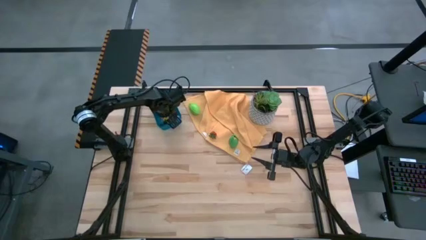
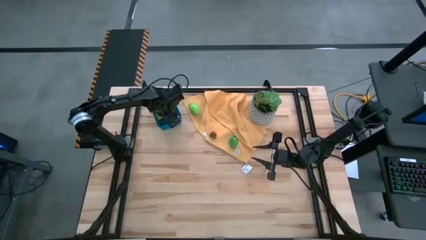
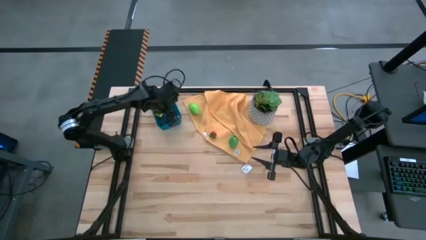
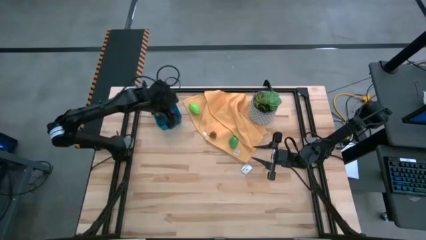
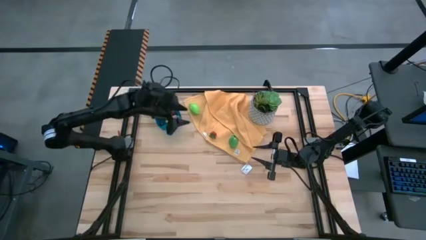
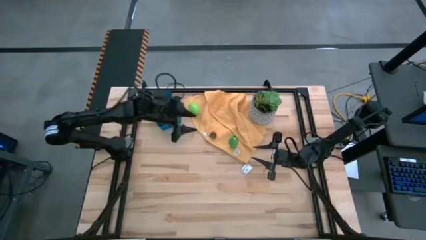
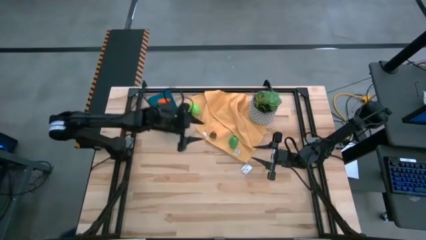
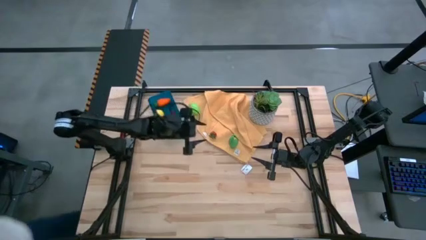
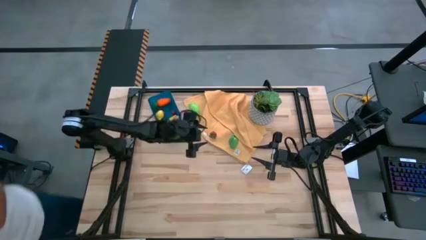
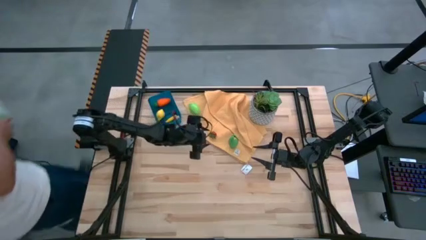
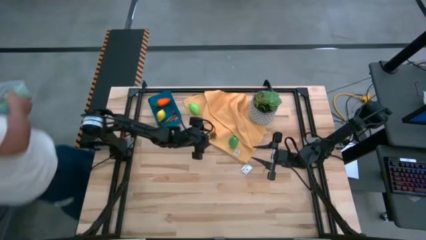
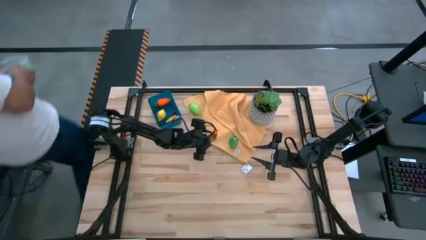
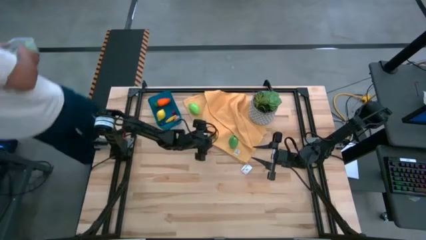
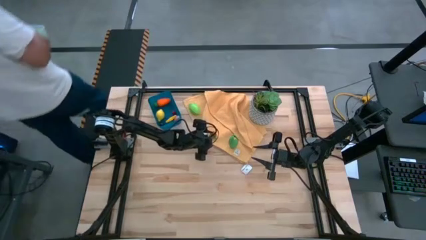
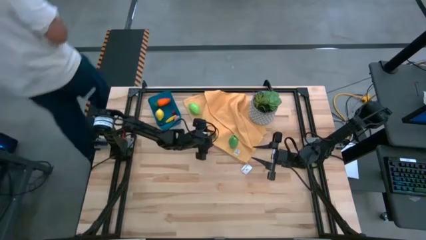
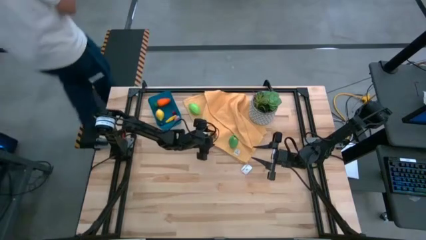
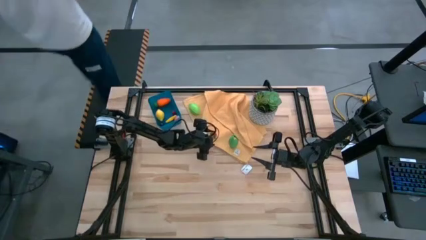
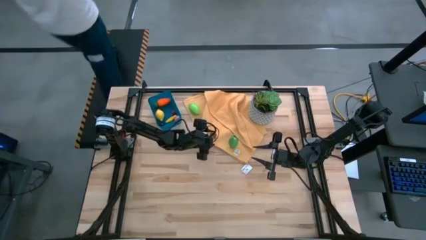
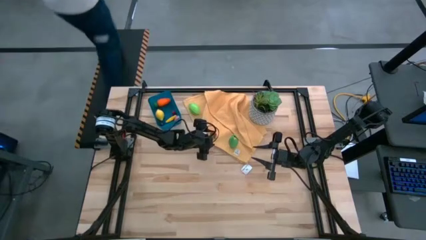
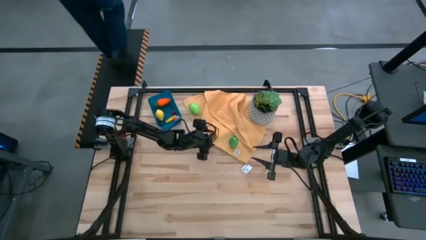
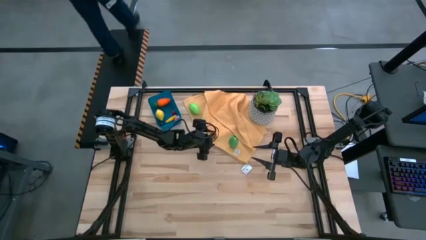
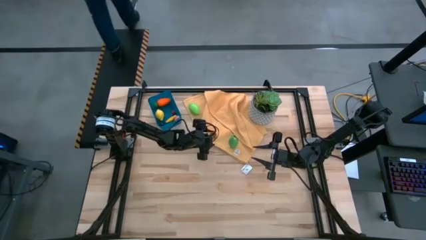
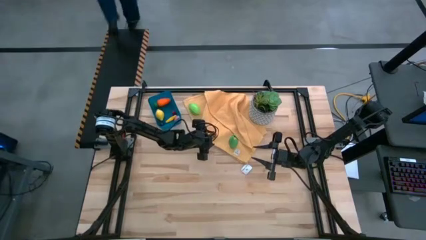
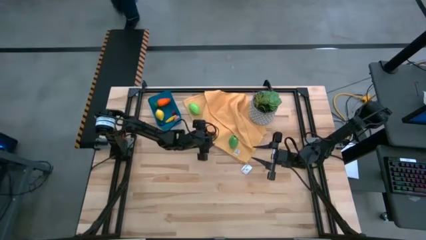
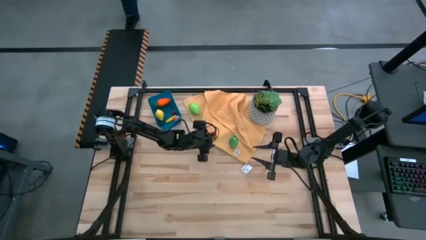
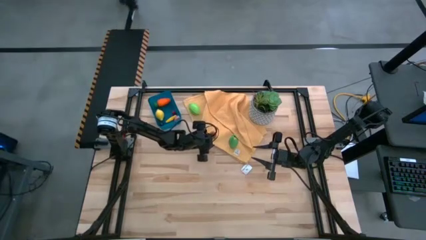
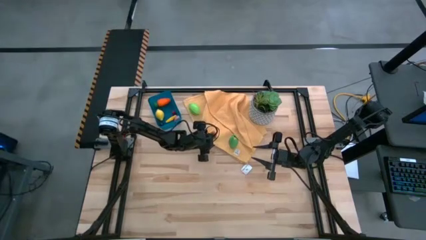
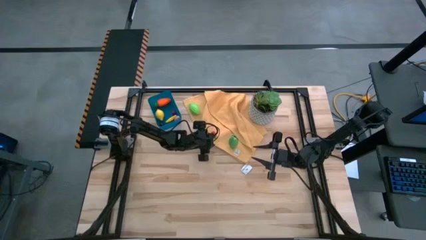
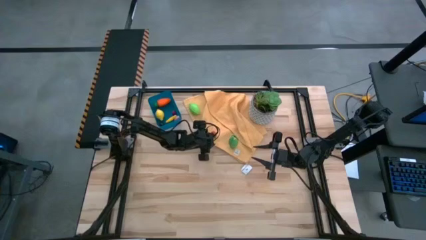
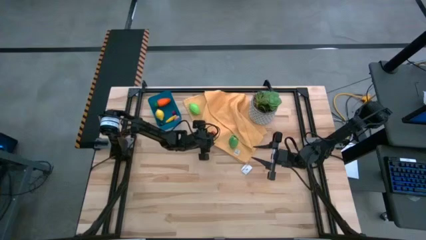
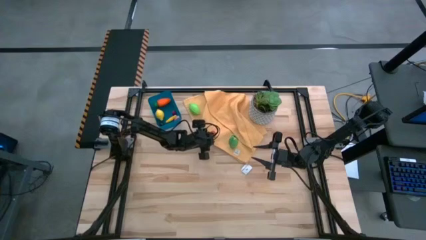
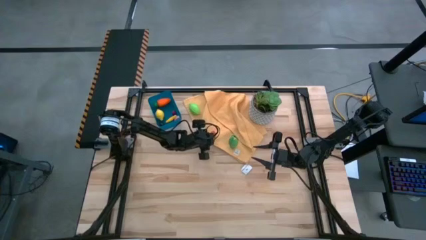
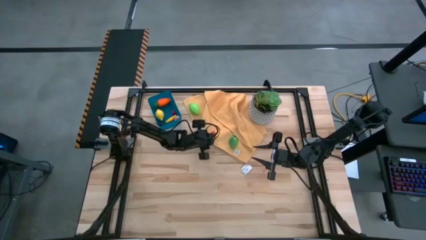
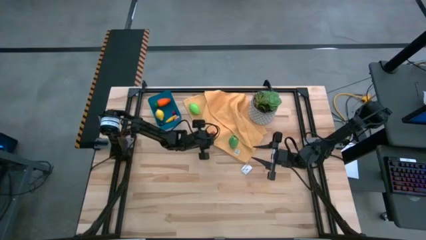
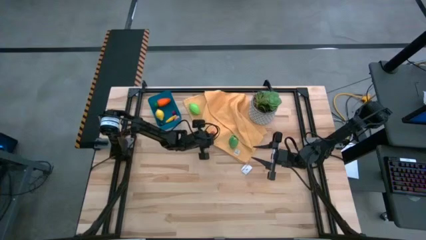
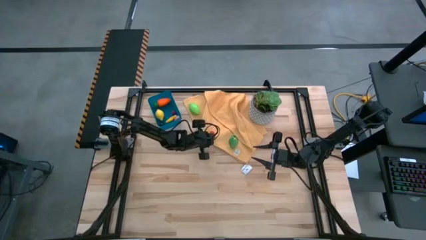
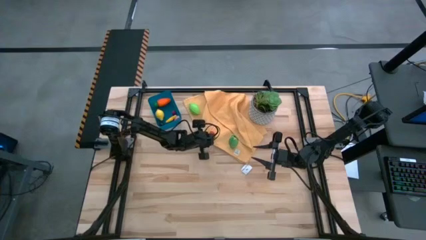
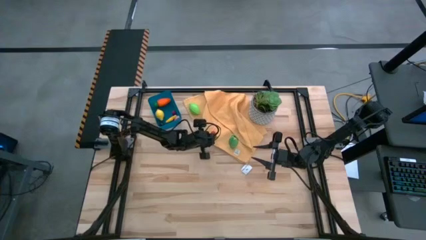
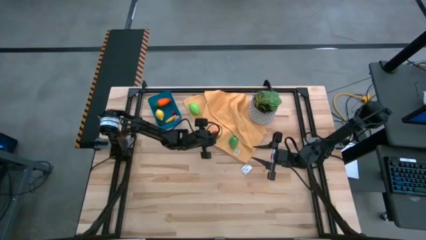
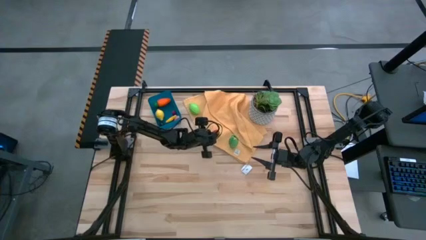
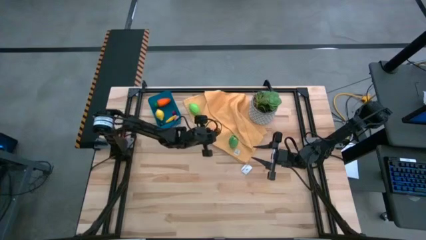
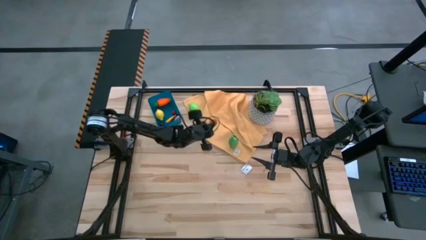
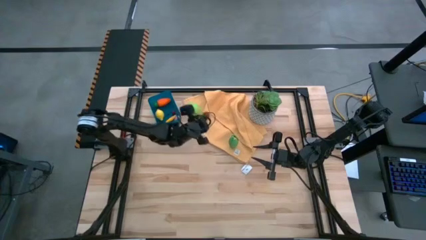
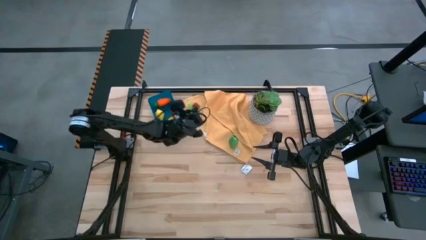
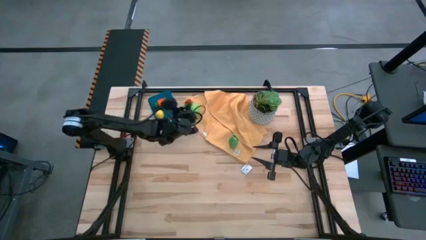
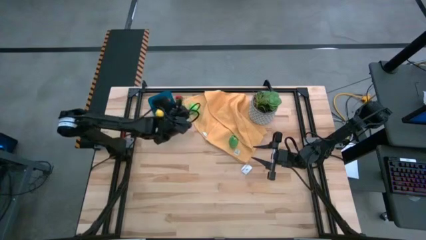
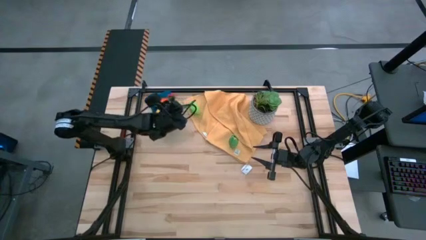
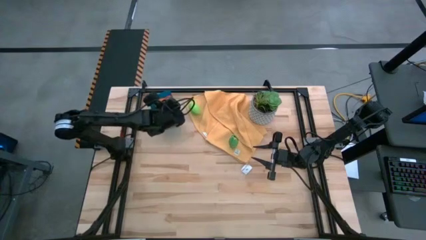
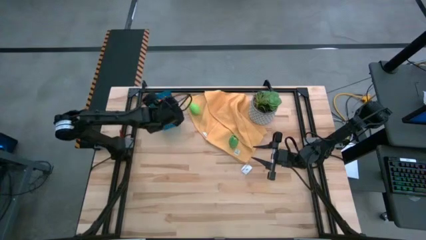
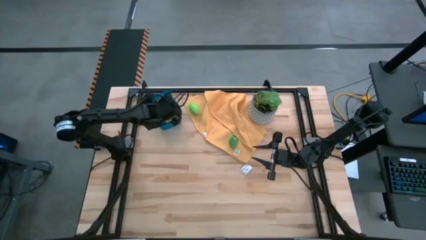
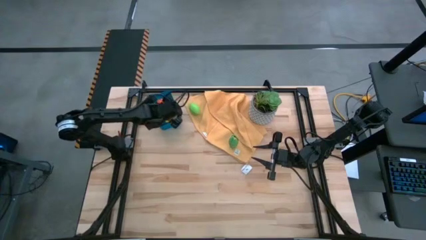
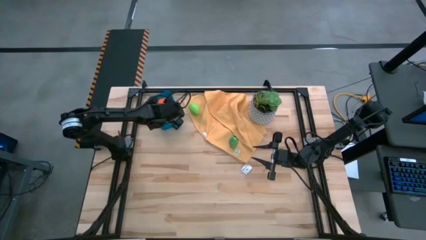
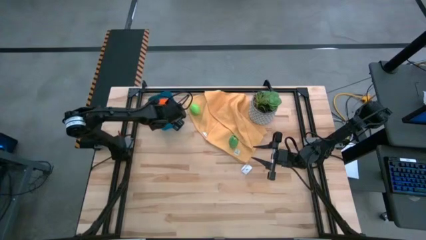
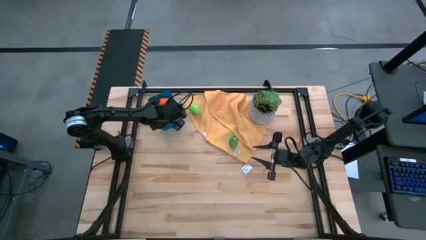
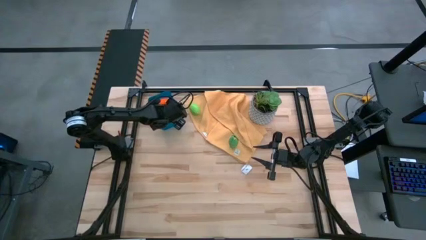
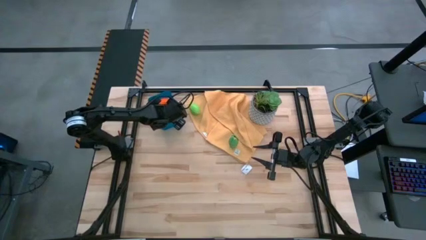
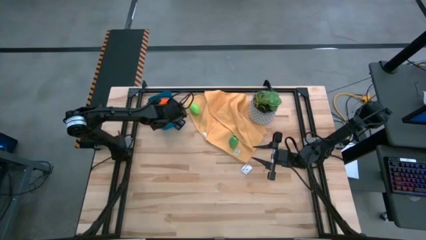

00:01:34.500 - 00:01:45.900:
Task: Pick and placing Produce into tupperware
Put the strawberry into the blue bin

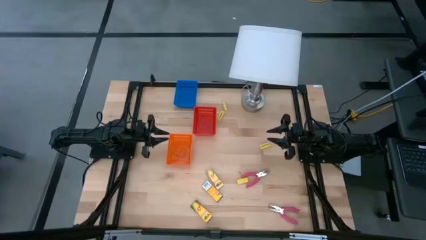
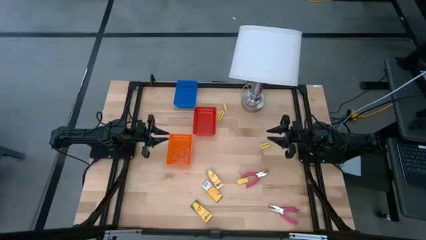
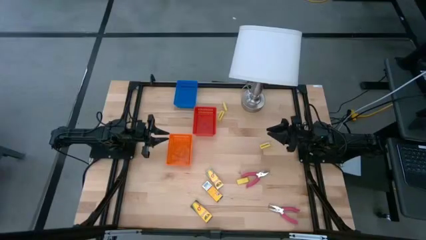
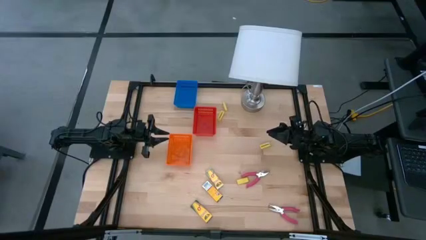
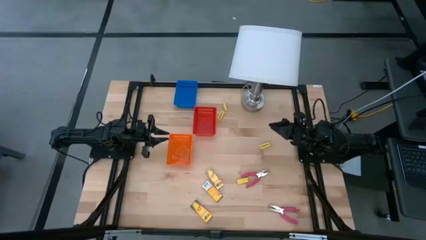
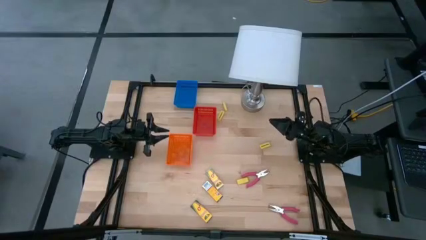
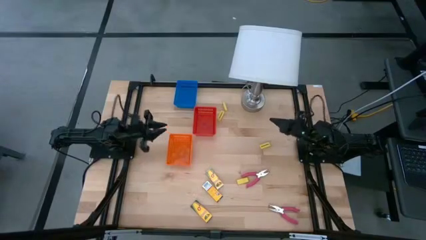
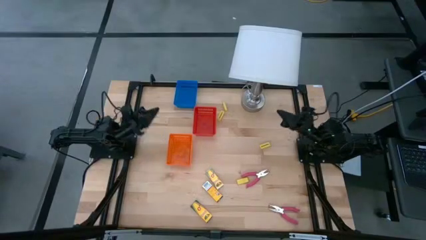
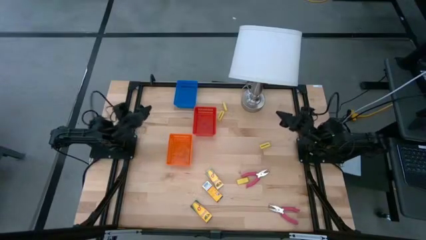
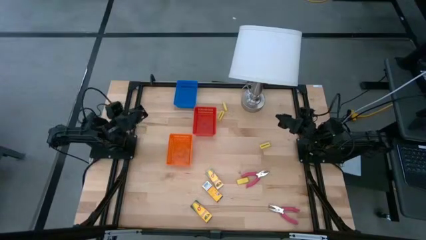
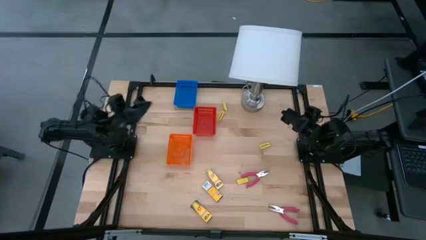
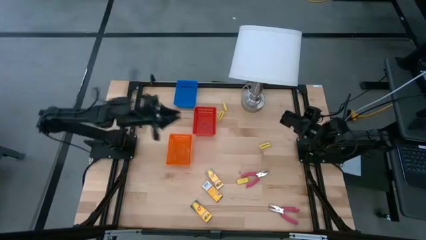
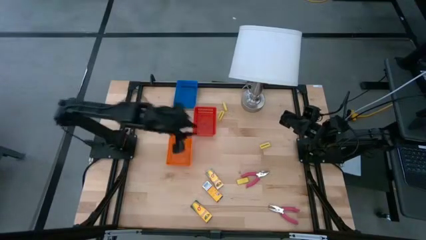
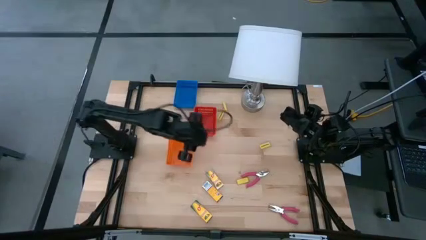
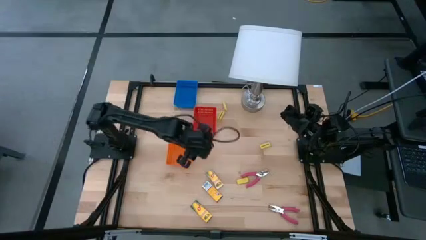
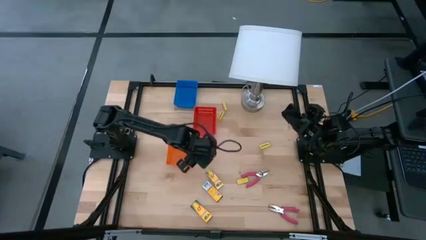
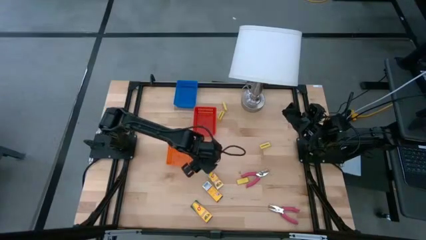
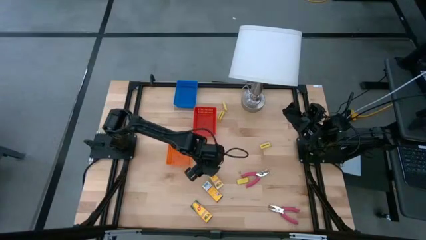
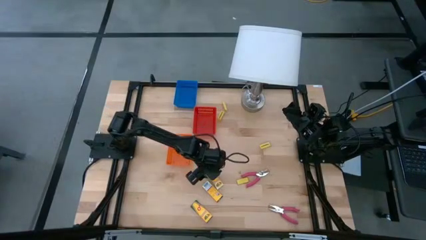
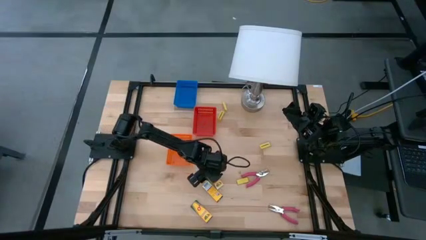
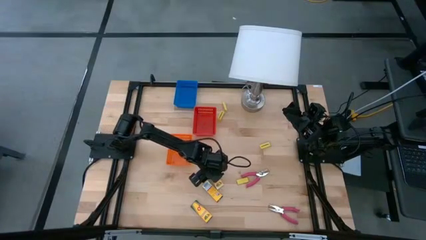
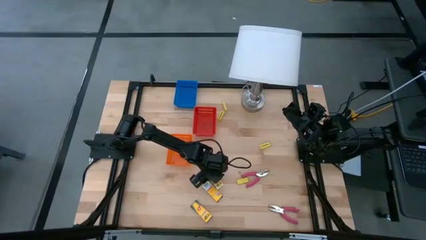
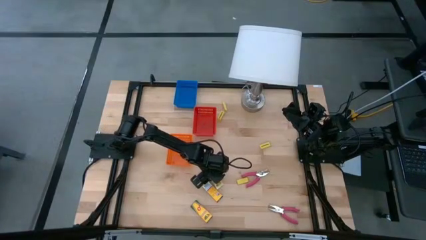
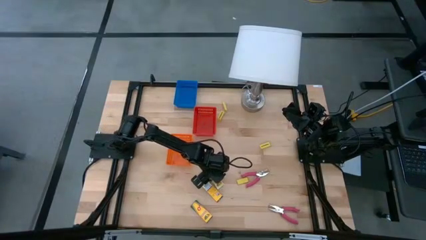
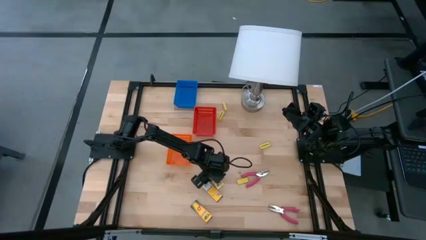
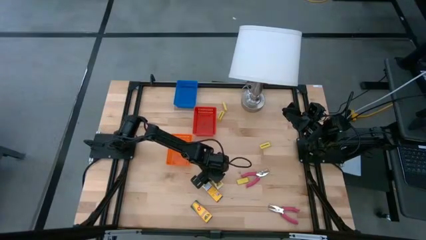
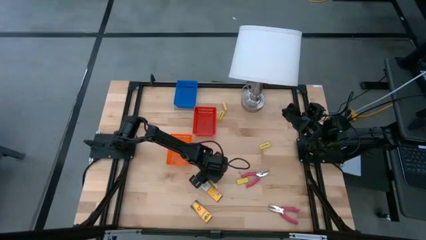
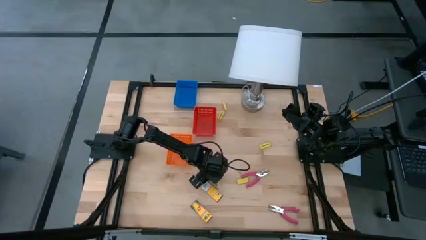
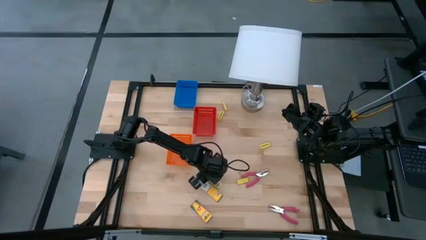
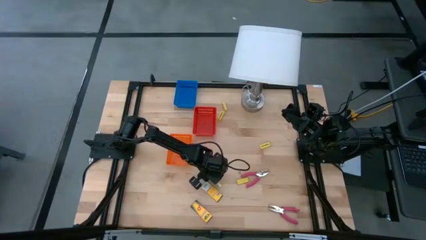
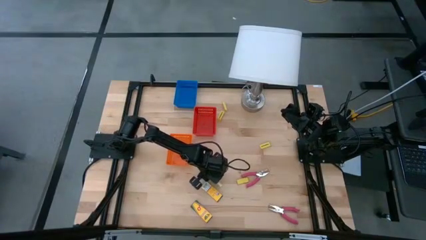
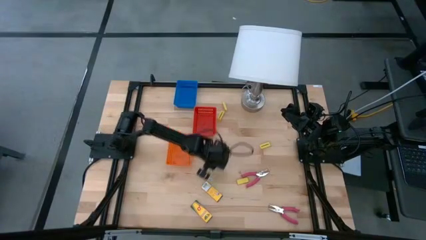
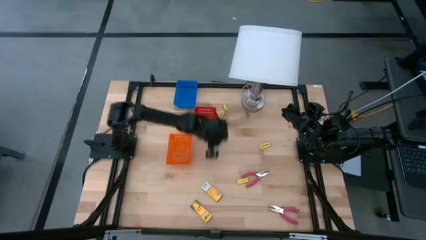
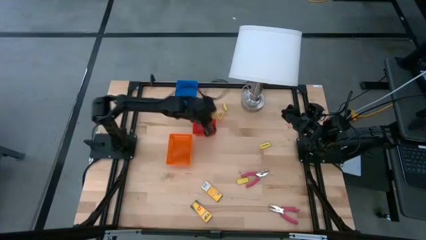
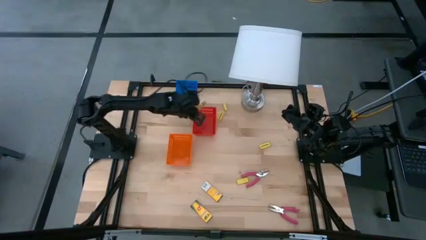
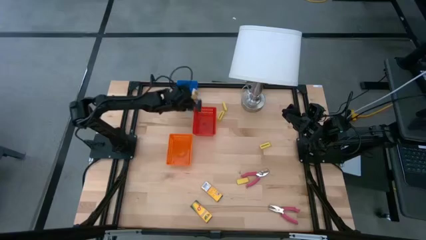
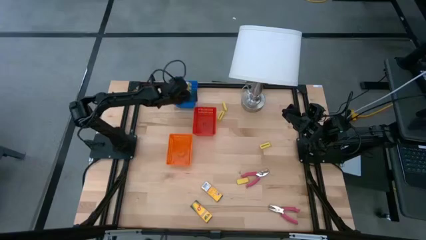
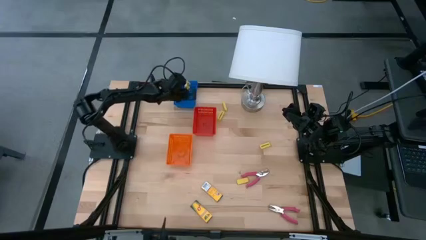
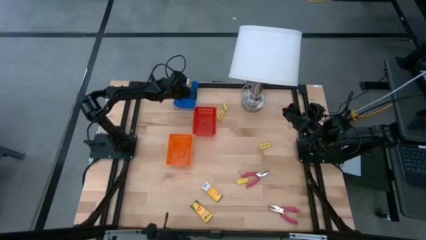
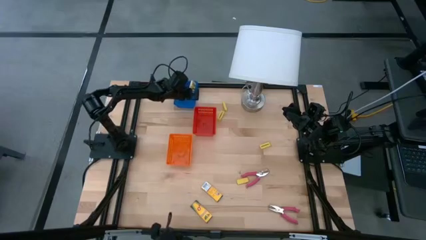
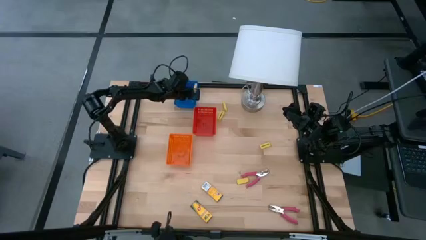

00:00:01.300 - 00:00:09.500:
Task: Pick & Place School Supplies
Put the yellow crayon box into the blue bin
